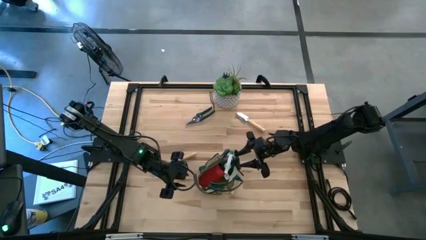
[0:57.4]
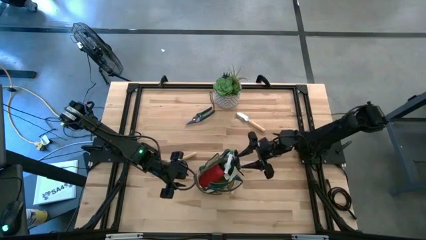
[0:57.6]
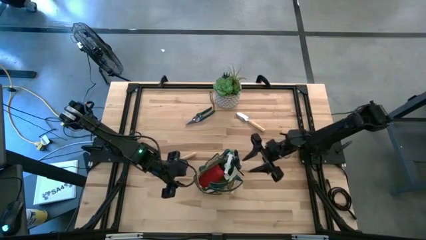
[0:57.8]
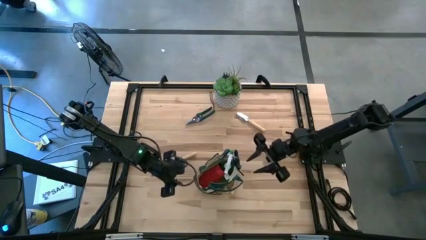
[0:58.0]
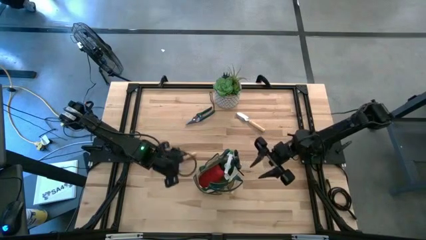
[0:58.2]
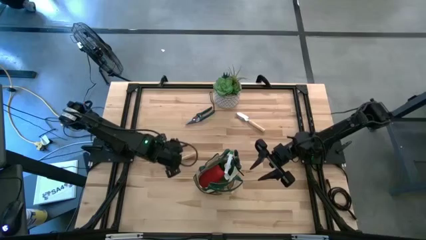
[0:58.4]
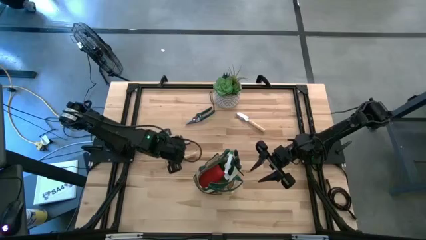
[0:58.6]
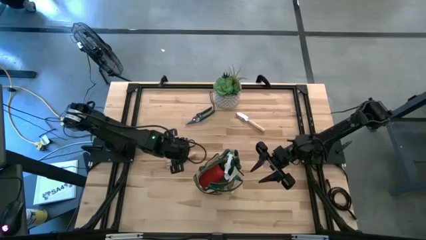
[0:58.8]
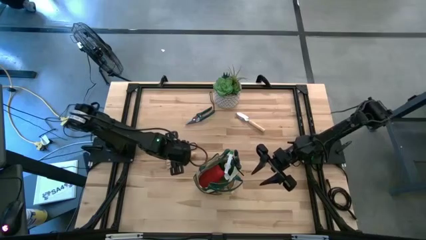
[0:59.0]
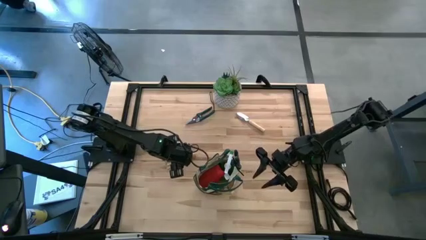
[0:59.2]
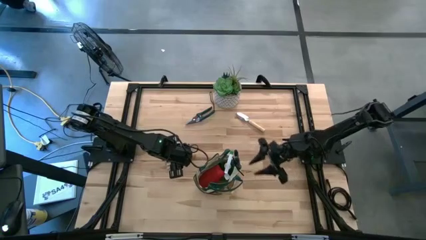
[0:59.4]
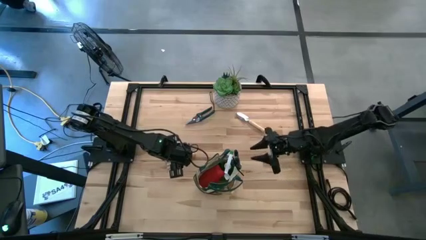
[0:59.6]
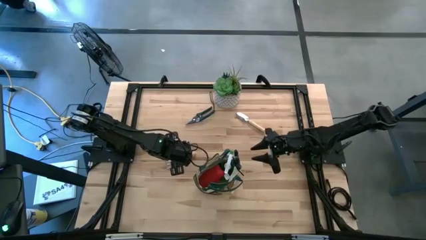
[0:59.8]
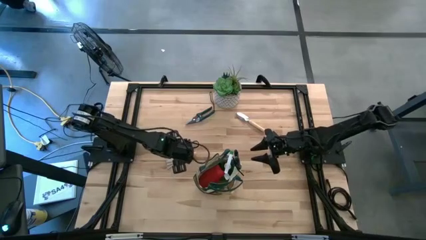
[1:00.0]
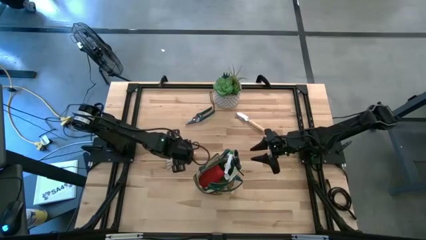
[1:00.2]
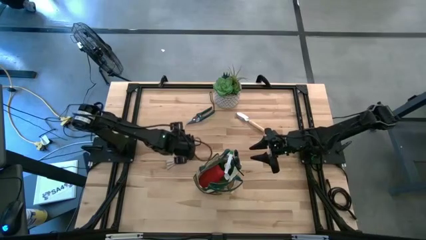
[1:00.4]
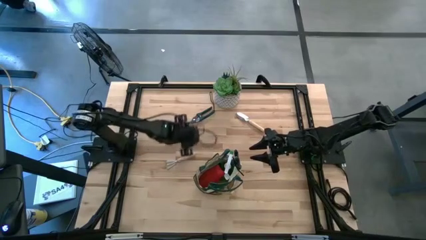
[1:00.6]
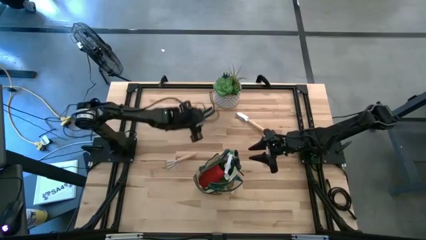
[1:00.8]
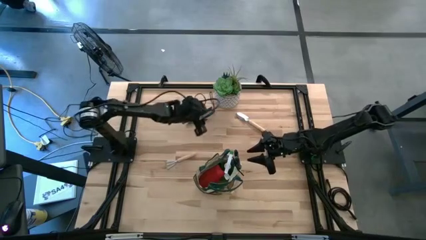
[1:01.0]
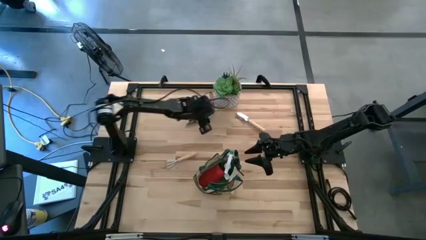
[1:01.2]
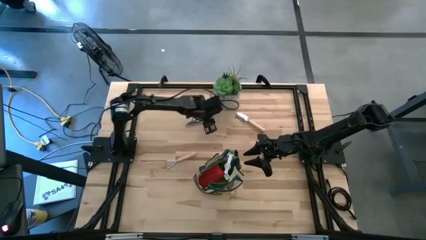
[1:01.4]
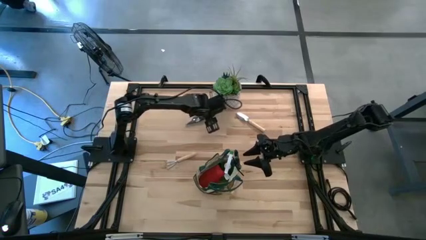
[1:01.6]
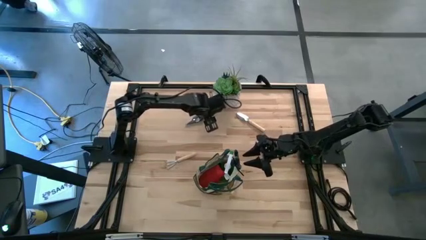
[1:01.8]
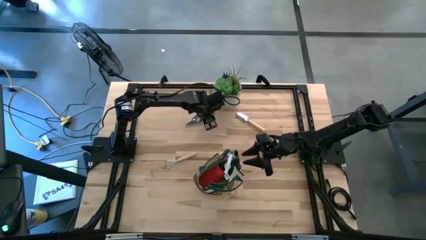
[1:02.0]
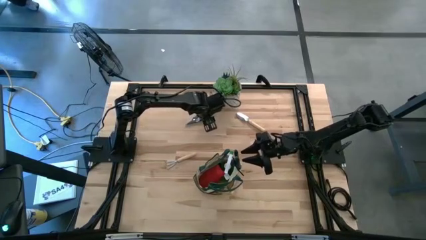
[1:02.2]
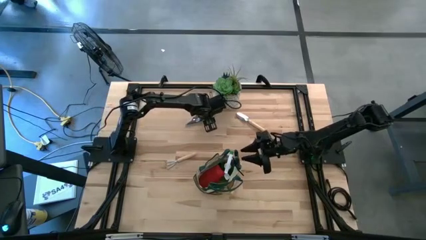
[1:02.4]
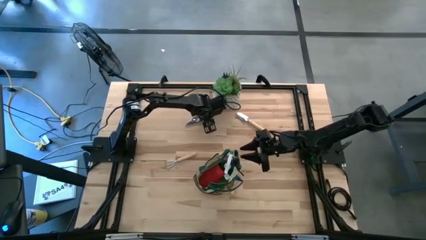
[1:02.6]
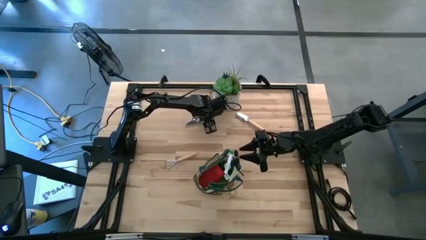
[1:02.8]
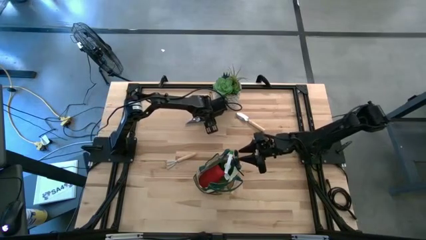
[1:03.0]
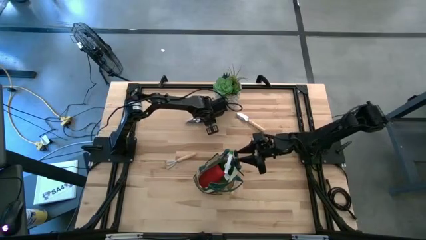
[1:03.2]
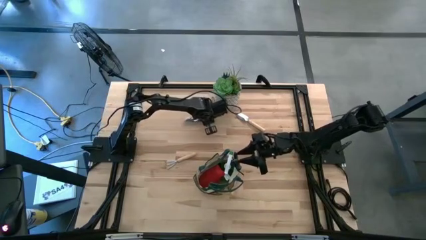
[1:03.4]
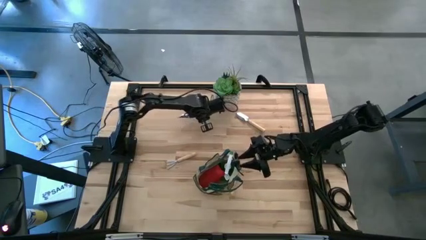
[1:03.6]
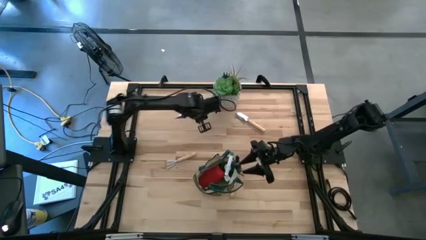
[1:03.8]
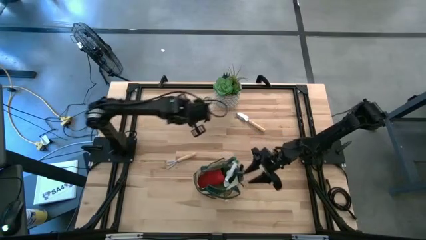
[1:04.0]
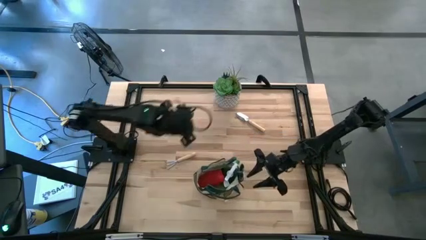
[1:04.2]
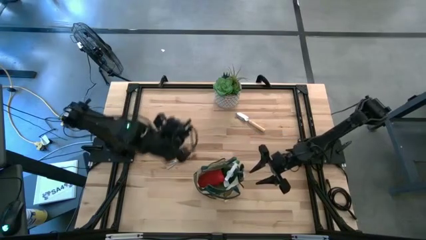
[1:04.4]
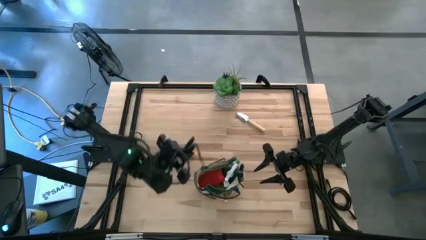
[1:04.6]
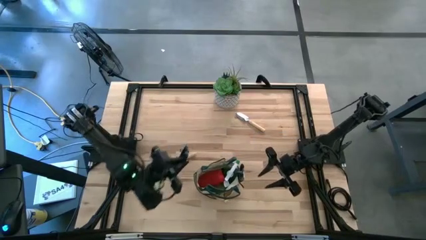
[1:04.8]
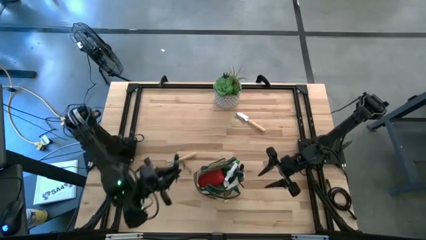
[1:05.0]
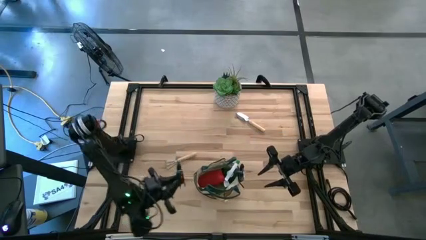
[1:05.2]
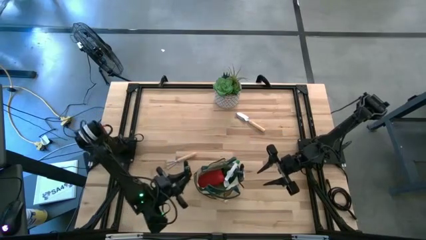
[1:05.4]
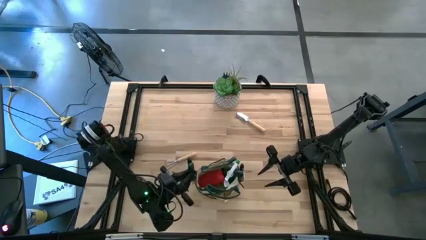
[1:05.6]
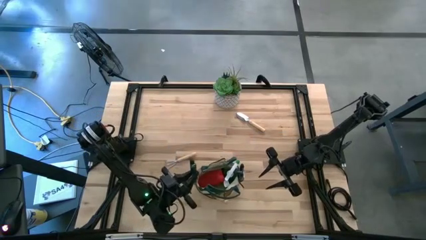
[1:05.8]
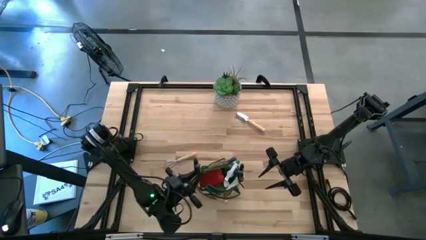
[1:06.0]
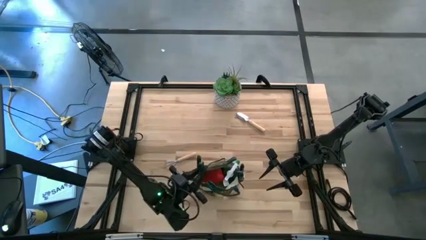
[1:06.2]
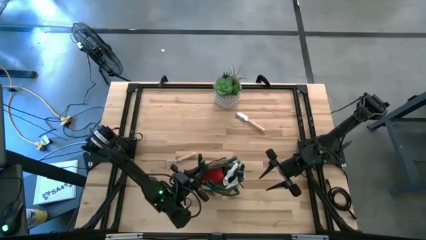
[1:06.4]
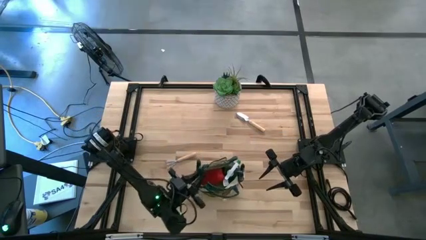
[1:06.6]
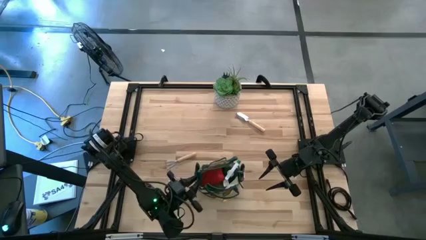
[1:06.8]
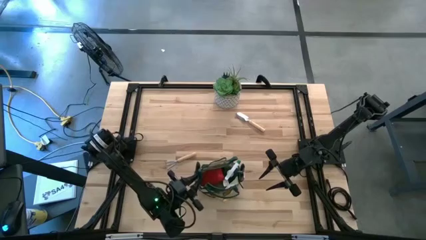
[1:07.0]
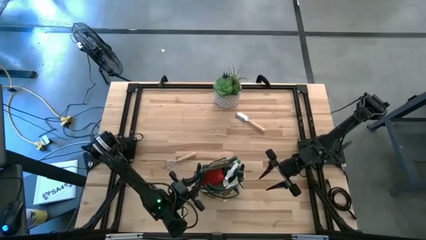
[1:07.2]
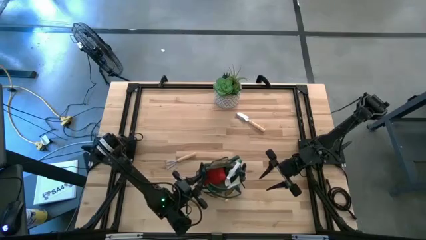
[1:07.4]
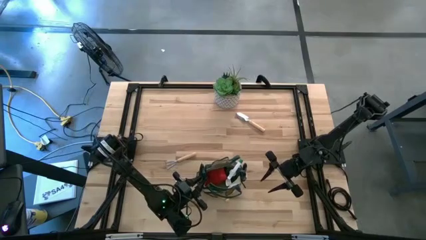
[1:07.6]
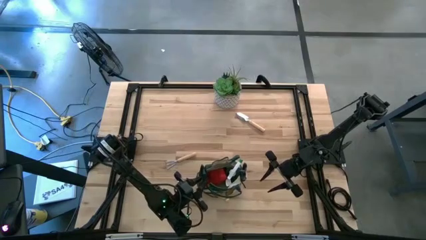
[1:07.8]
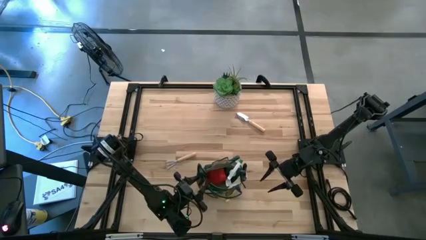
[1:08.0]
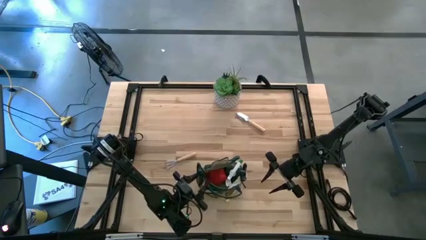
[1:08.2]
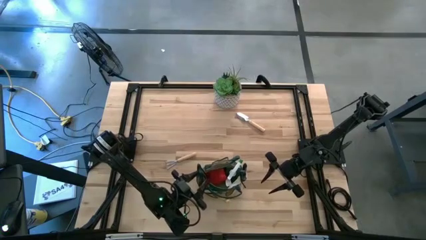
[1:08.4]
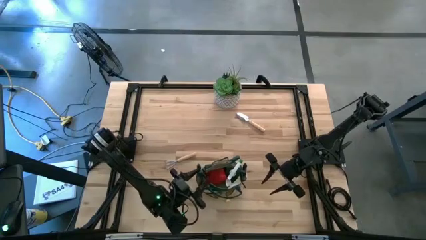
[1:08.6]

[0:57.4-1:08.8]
Task: Pick & Place Garden tools in Gardening bag
Put the green shear scissors into the green gardening bag
